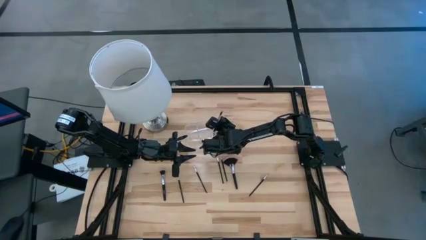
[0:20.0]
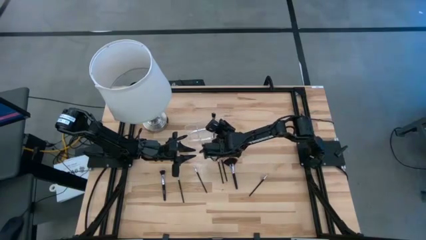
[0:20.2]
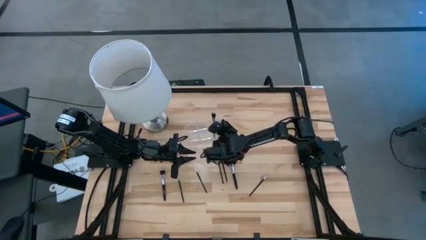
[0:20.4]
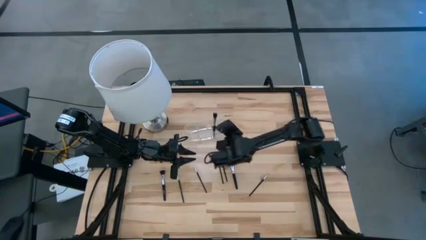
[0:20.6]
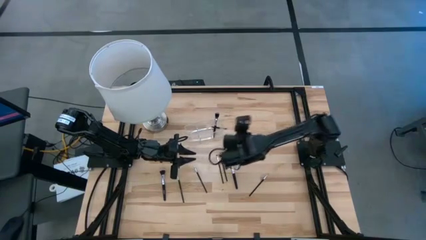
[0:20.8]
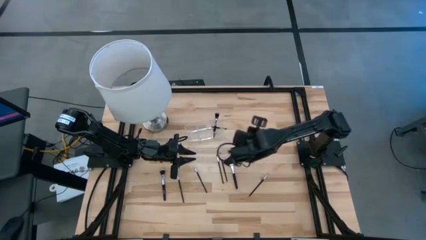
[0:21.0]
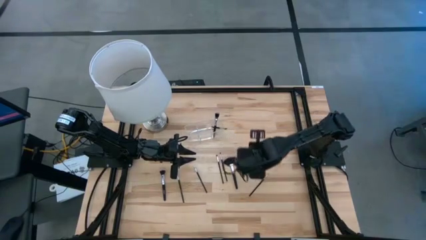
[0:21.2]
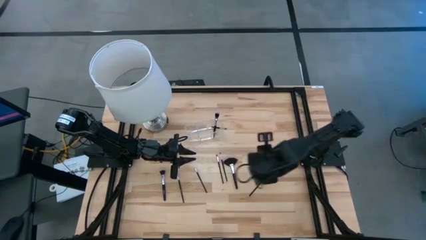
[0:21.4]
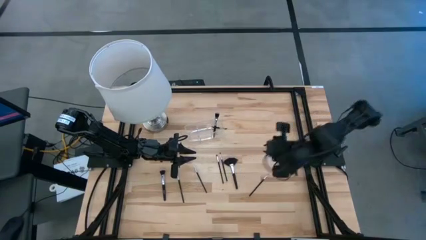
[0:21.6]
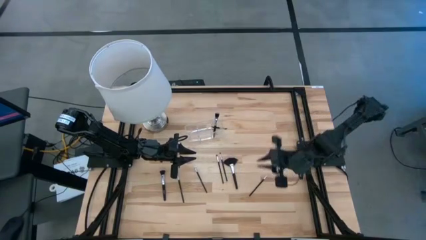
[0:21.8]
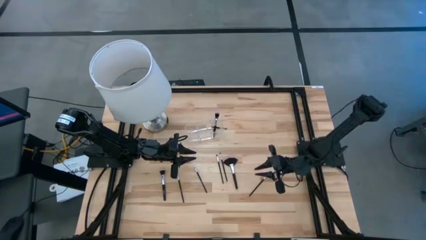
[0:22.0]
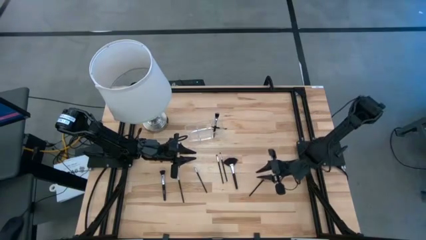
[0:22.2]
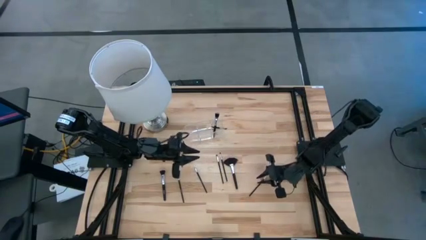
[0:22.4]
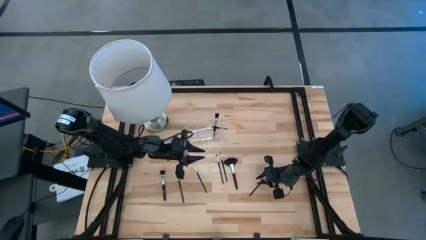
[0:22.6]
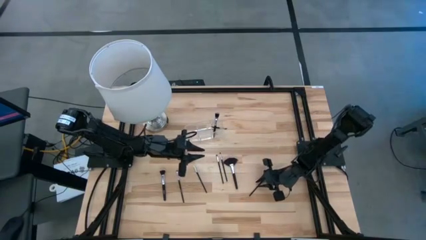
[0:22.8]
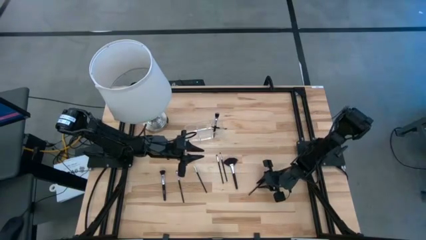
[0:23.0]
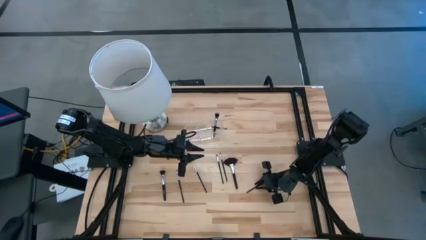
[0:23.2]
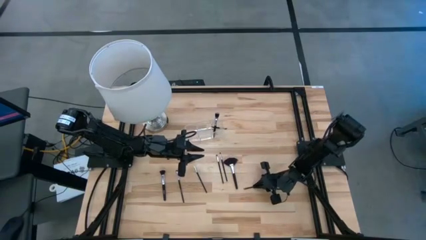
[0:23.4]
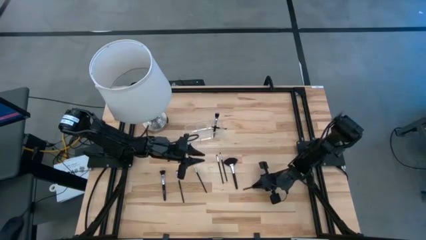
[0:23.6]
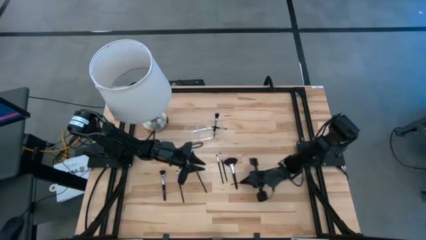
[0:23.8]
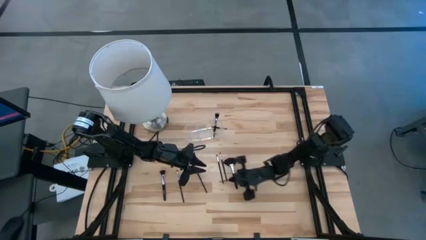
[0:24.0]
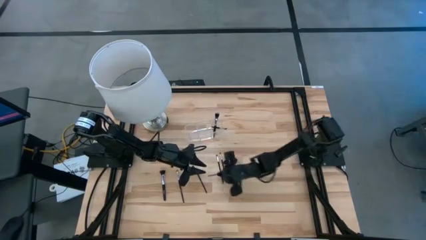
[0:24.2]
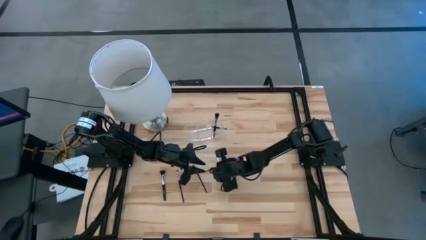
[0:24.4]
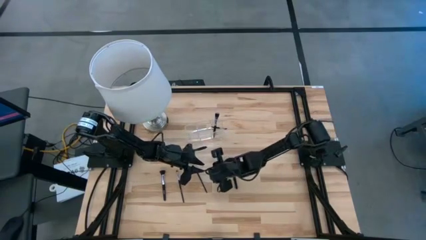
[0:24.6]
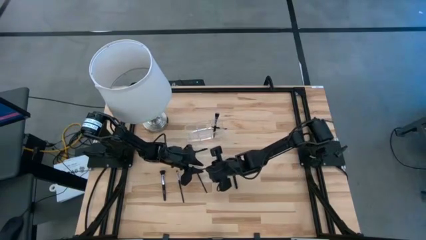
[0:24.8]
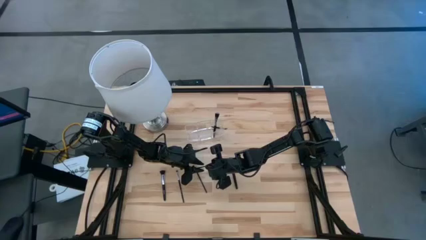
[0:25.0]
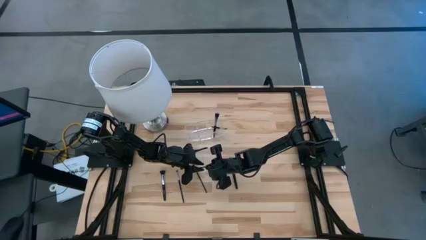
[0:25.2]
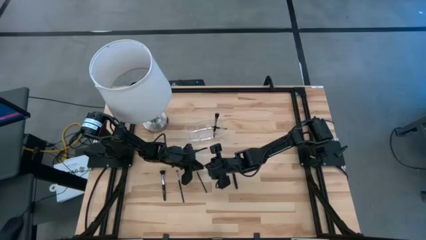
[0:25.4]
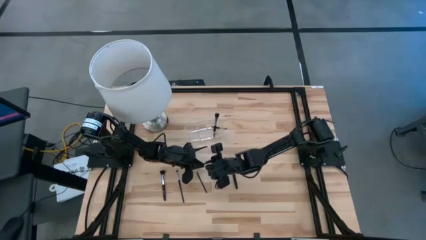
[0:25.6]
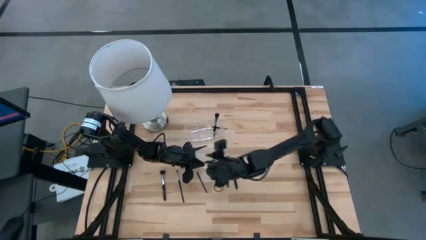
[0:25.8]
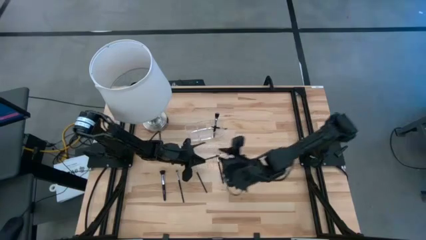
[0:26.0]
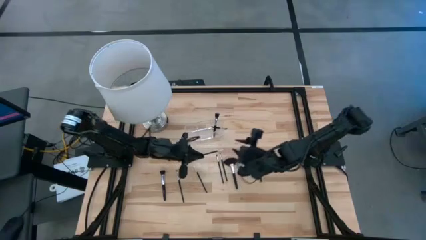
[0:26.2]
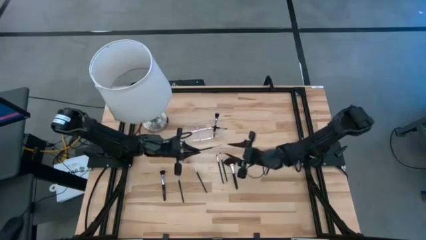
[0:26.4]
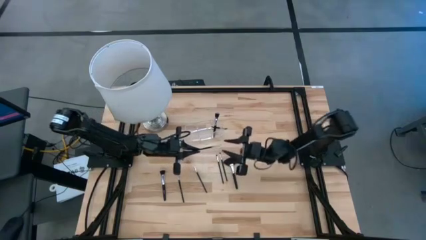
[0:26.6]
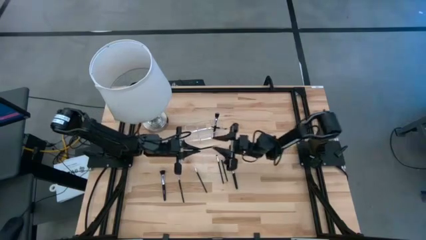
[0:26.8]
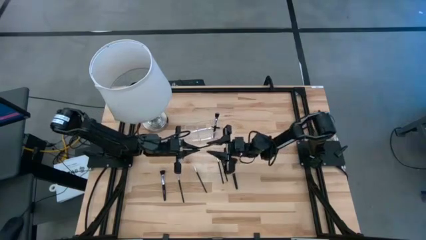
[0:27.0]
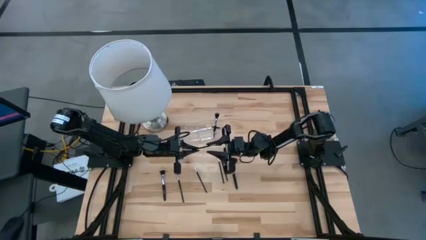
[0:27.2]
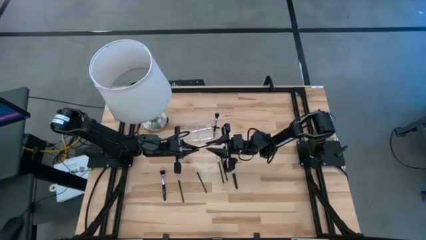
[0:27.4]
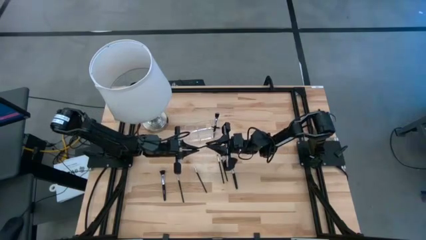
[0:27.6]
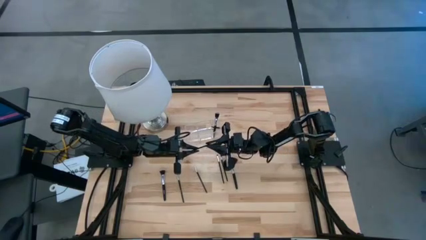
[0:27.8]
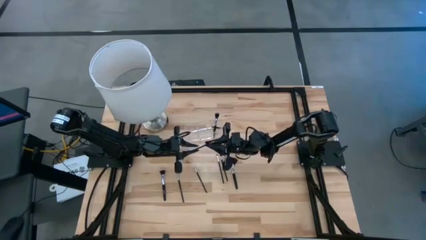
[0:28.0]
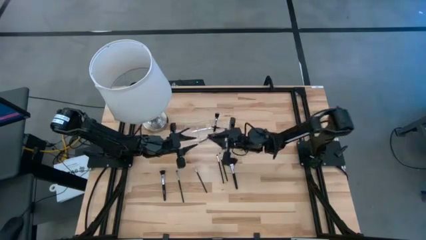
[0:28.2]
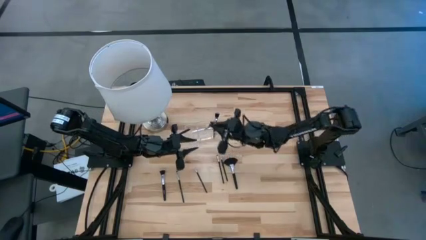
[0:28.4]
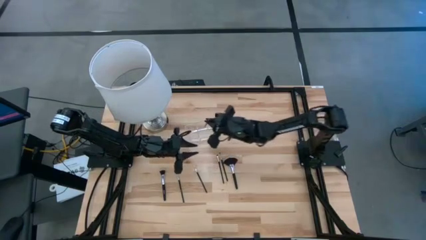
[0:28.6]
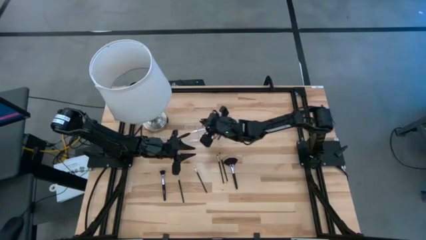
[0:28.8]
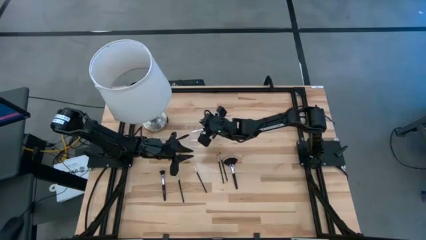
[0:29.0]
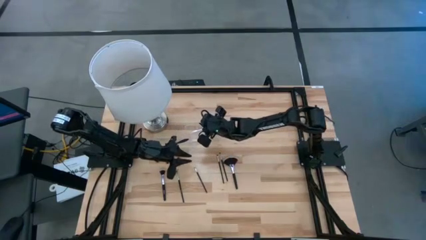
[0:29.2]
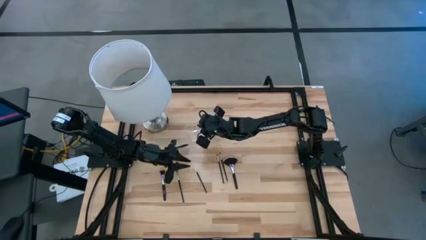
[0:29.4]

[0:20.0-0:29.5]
Task: Put items in baskets/containers
Put the black liner brush into the transparent organizer

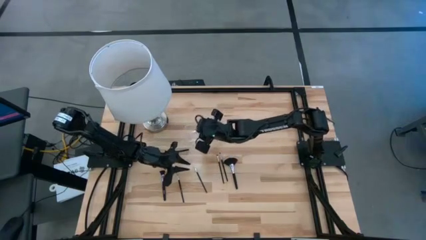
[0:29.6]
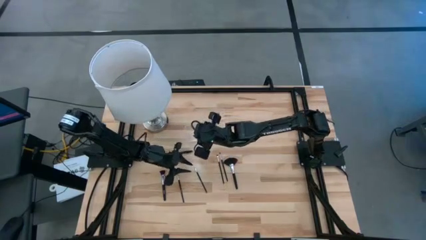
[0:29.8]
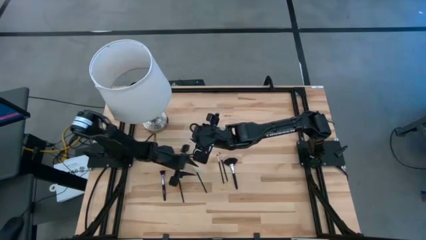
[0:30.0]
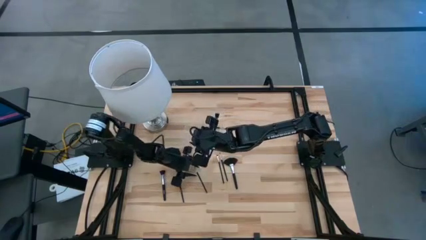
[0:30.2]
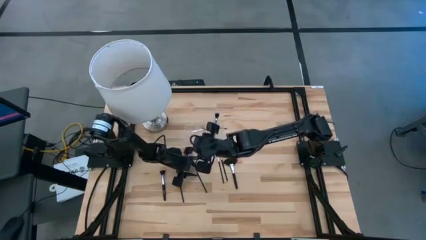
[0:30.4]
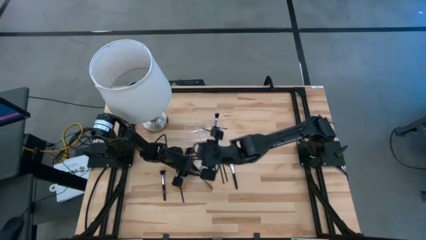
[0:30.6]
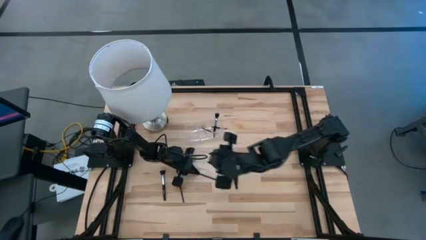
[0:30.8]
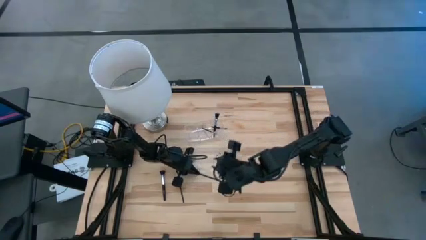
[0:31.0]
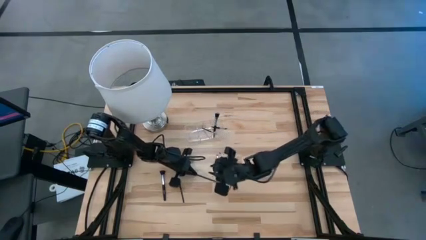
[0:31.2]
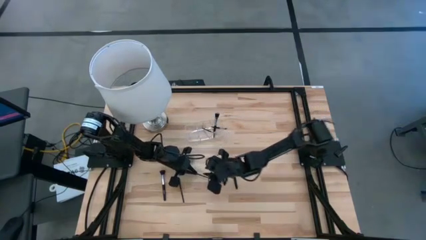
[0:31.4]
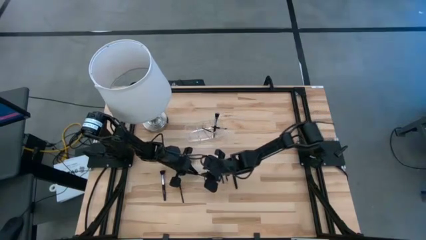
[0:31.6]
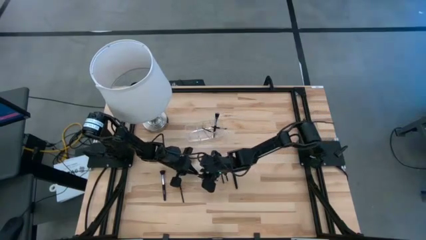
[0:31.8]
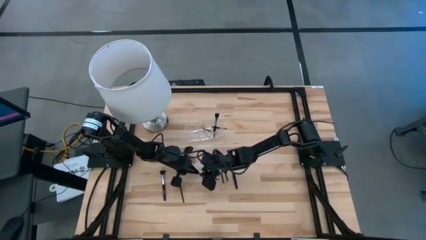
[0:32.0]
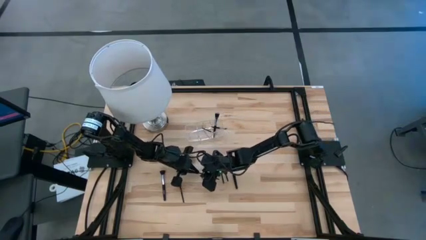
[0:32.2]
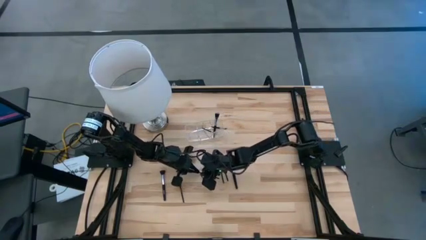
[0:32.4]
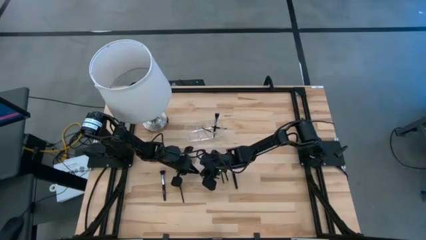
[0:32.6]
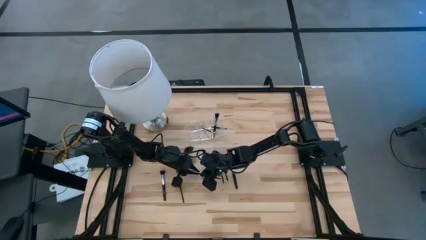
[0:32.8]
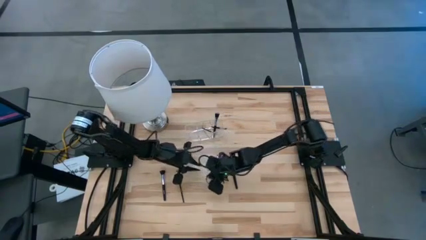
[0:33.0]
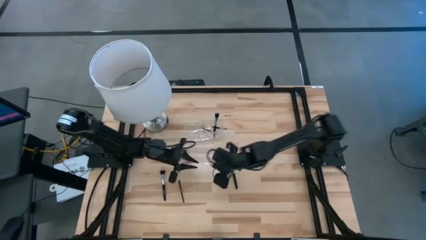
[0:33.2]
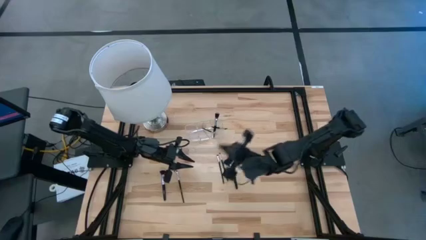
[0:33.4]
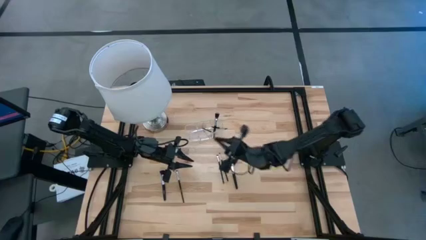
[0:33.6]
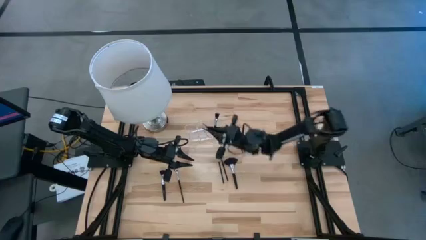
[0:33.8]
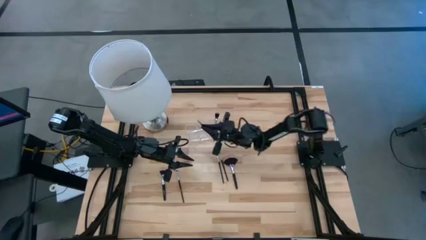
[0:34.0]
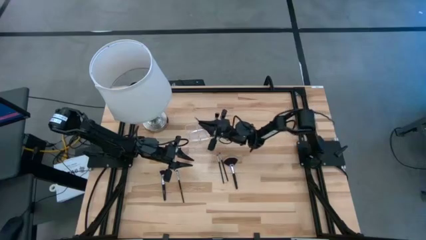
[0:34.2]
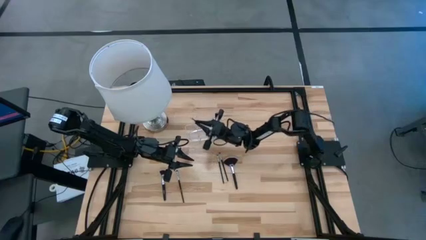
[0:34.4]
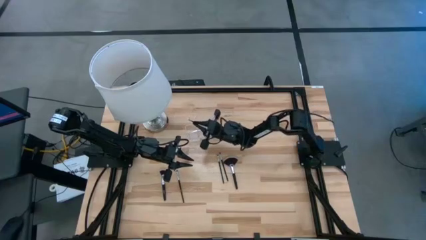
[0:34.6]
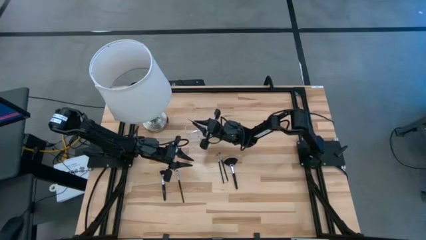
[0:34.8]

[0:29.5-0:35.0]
Put the white and black eyeshadow brush into the transparent organizer
